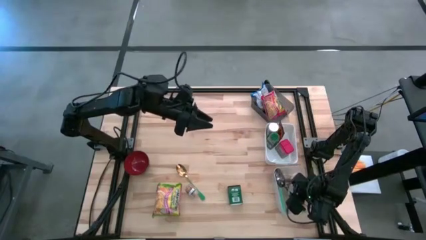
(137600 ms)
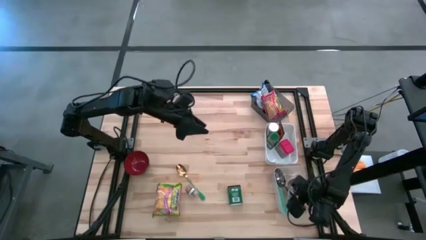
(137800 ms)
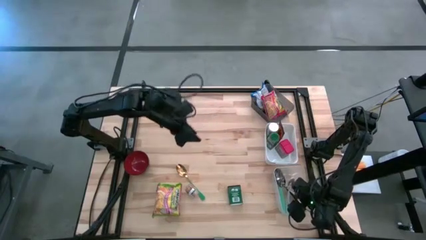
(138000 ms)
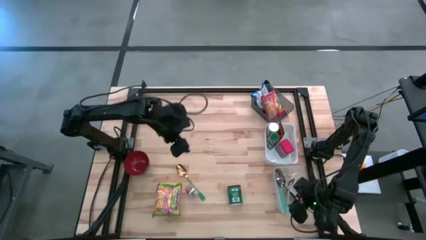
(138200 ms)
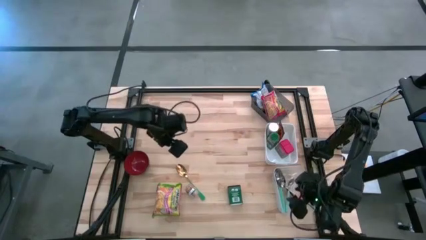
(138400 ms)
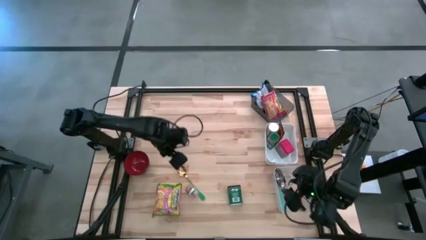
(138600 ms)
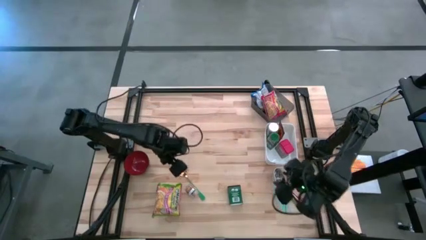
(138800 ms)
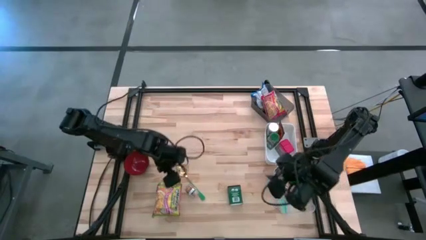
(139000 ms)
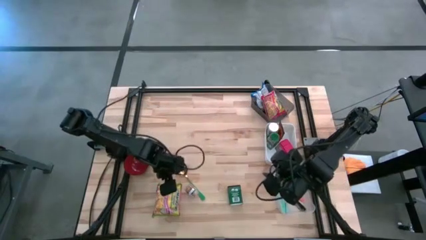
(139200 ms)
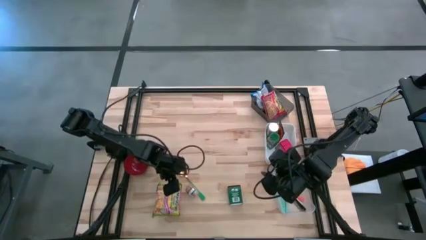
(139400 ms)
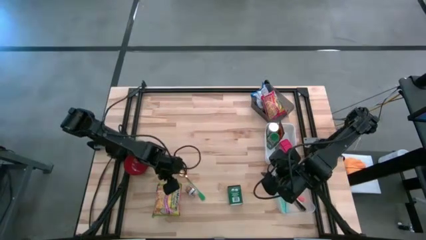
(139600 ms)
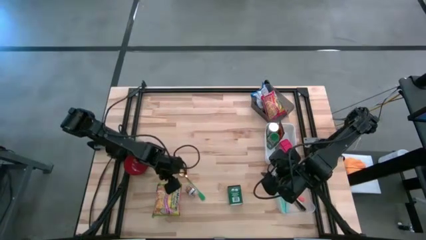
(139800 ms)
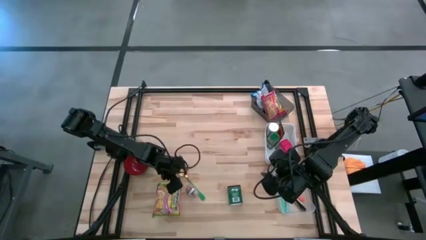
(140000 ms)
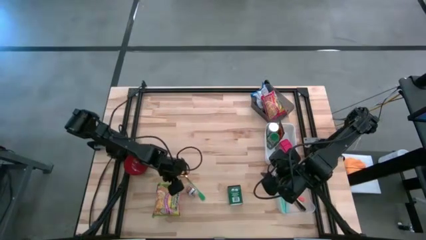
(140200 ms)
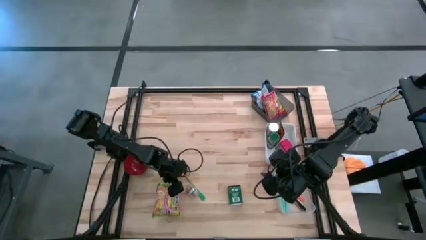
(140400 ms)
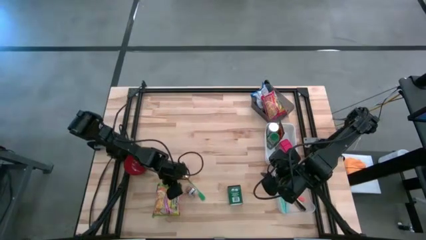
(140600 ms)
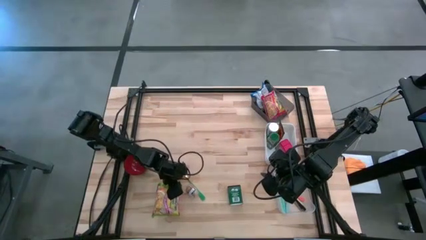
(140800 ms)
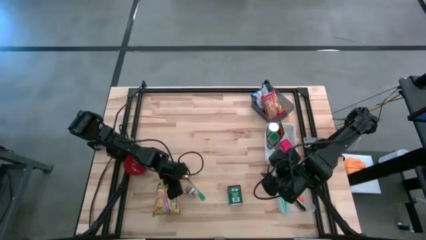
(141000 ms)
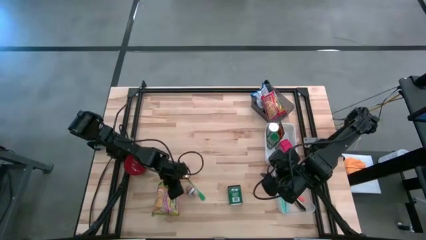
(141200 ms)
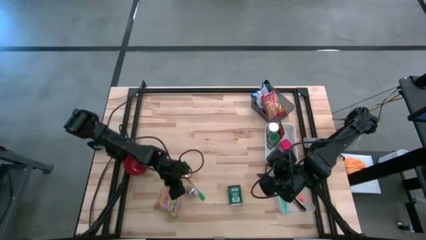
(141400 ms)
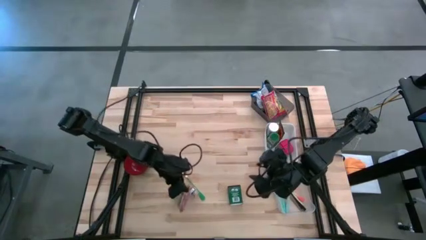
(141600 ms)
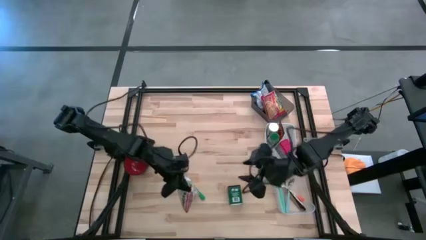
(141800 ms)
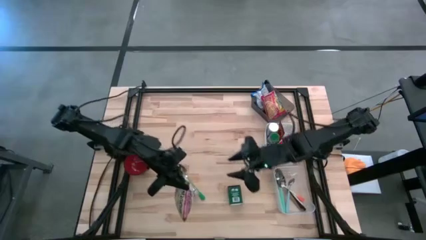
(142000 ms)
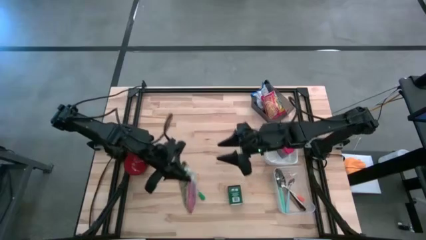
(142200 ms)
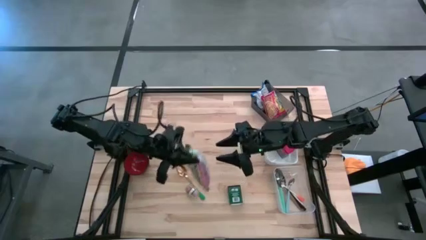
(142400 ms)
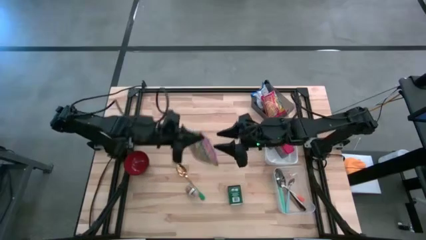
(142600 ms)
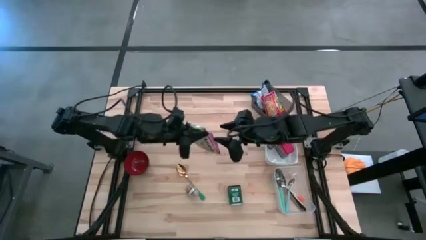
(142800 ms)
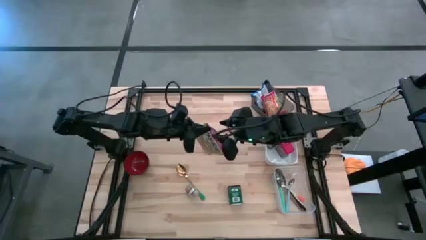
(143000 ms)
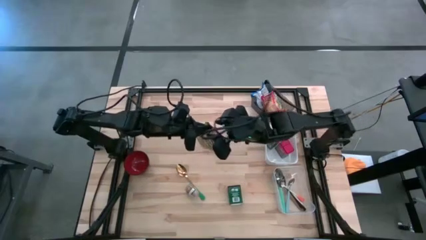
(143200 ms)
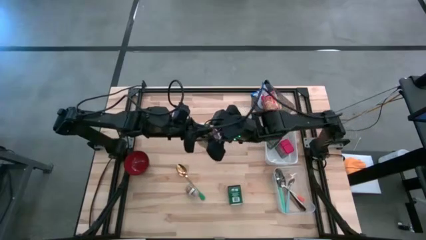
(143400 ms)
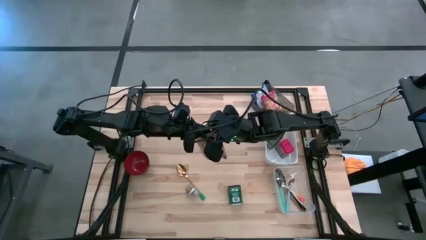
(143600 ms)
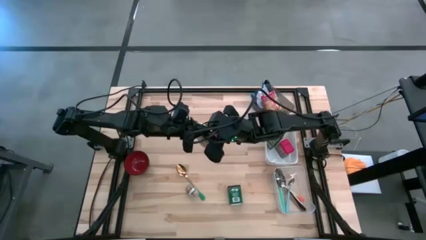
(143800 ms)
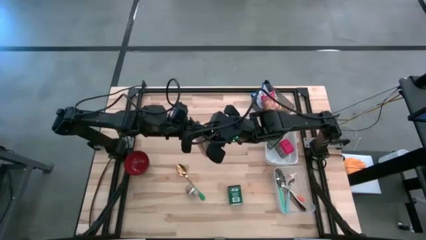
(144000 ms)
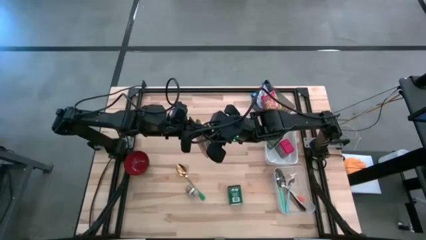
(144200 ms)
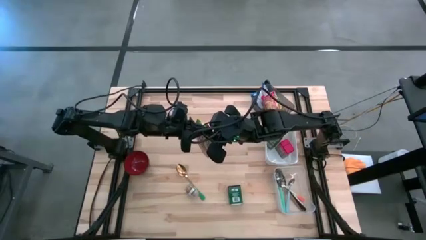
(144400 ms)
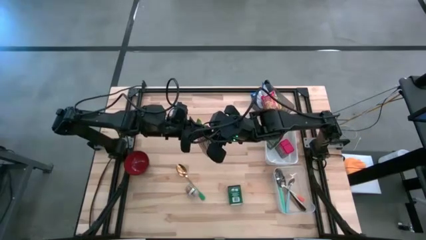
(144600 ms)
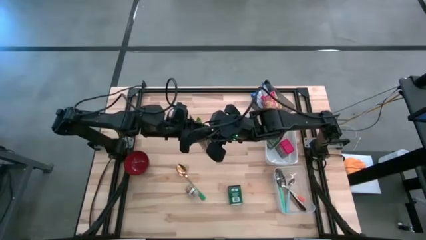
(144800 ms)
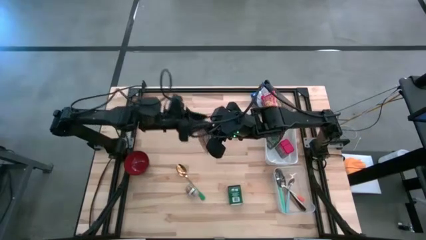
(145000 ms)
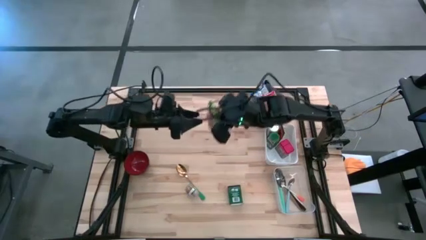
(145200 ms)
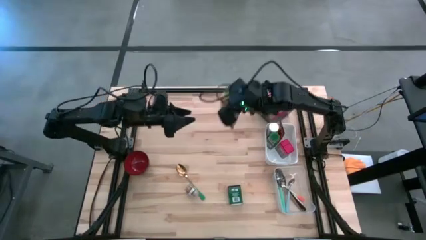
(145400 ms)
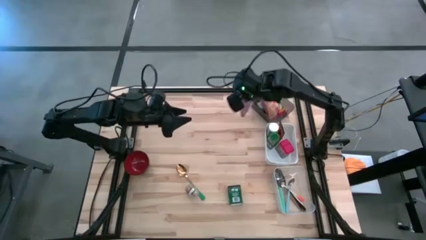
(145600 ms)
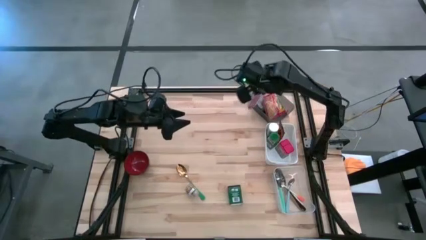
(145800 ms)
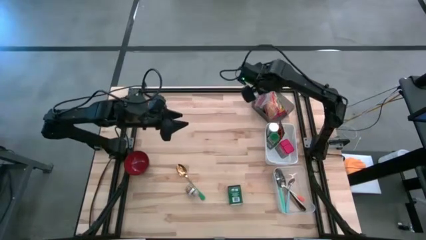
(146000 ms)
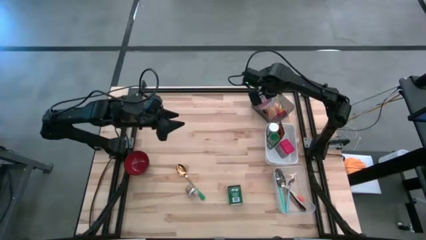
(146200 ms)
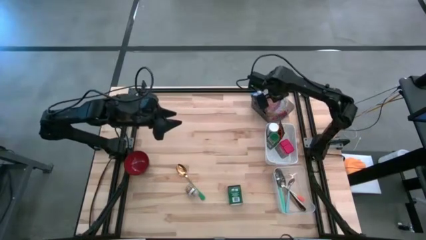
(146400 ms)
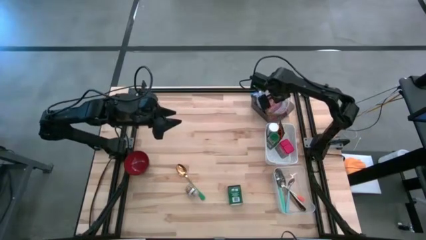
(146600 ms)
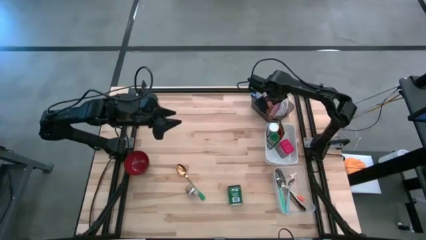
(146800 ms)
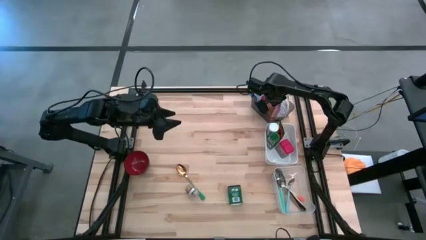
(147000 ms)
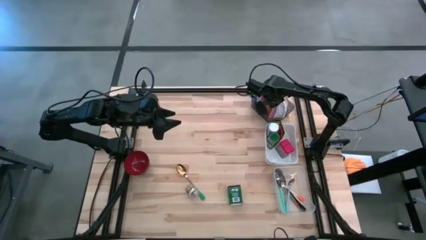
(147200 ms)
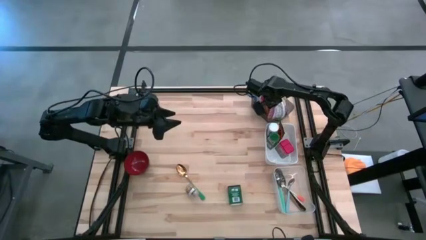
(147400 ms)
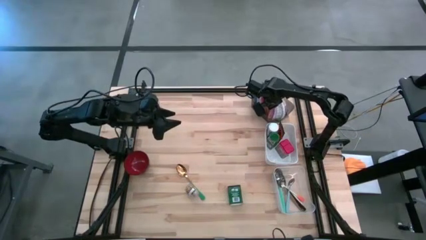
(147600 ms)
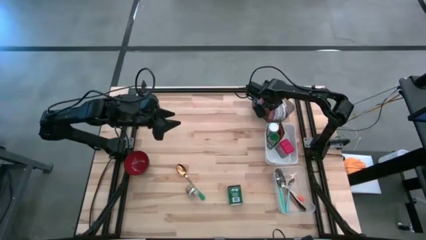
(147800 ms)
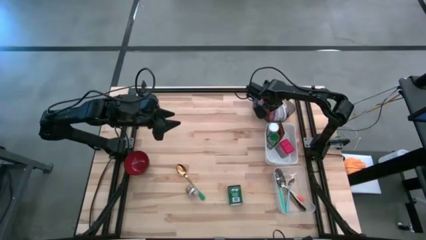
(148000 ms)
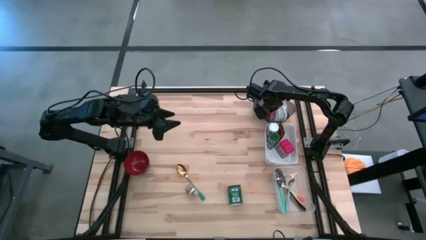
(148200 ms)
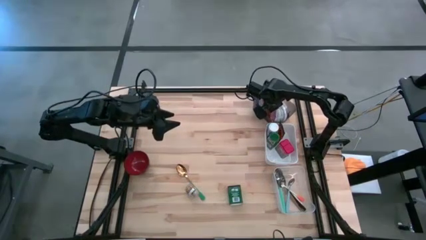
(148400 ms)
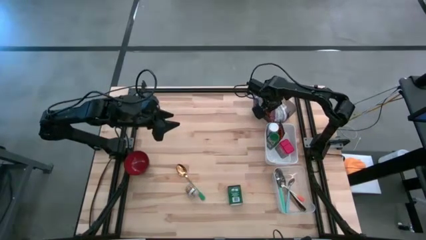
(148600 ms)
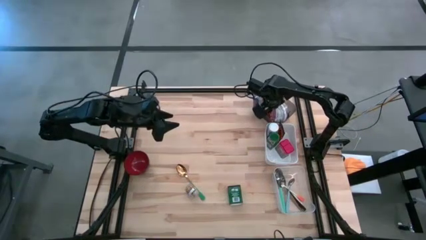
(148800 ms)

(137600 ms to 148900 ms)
Put the green noodle pack into the black bin

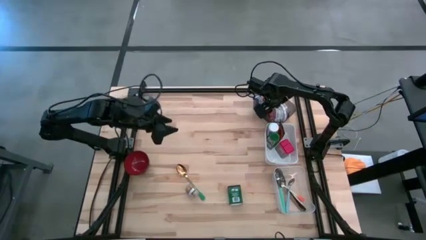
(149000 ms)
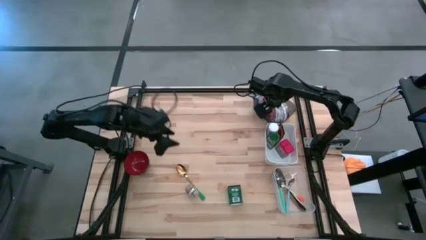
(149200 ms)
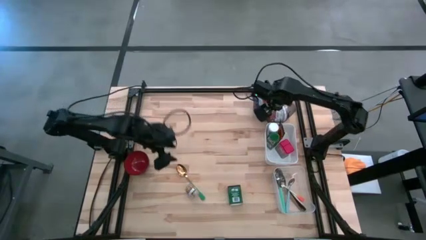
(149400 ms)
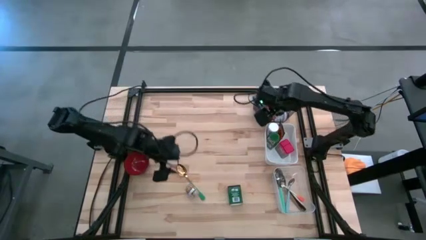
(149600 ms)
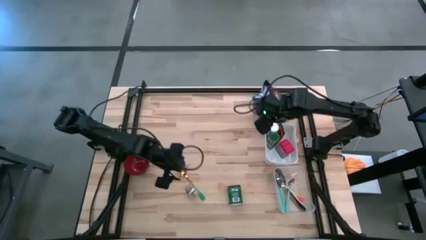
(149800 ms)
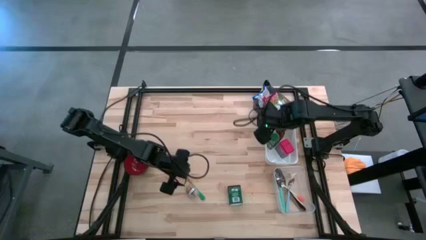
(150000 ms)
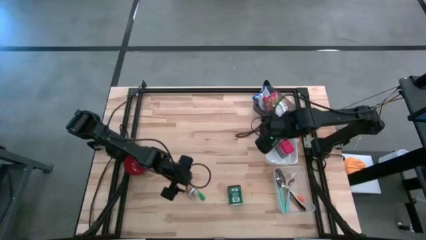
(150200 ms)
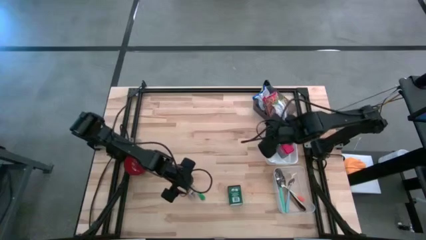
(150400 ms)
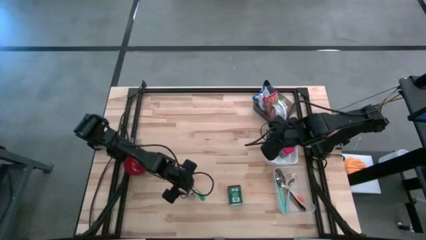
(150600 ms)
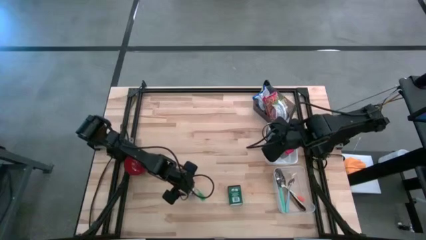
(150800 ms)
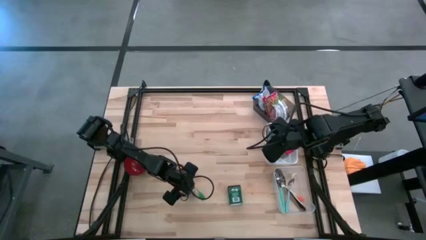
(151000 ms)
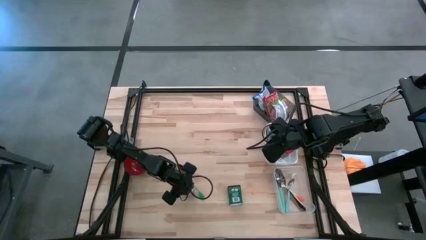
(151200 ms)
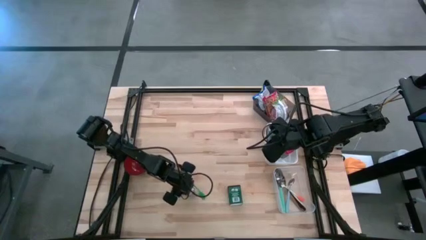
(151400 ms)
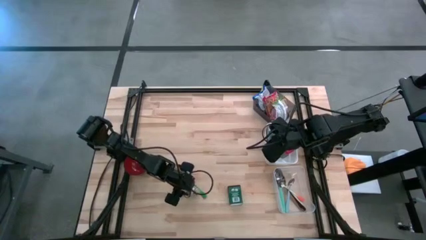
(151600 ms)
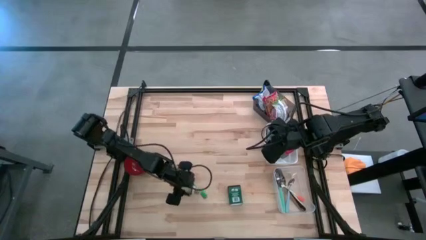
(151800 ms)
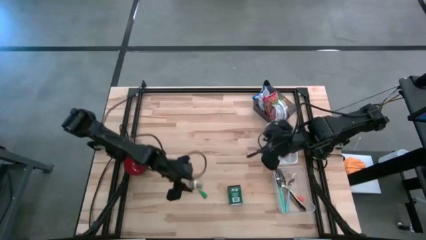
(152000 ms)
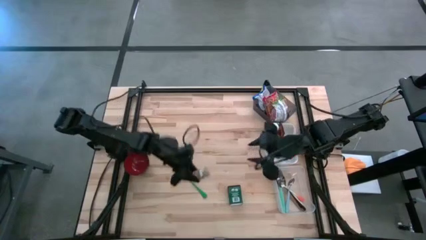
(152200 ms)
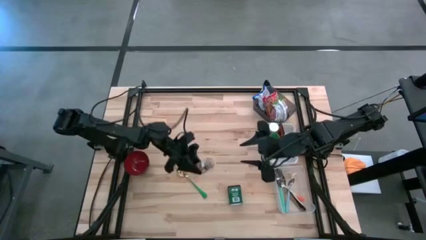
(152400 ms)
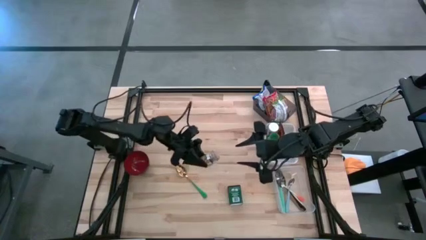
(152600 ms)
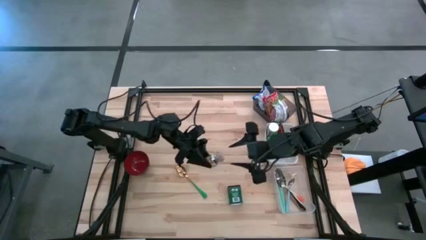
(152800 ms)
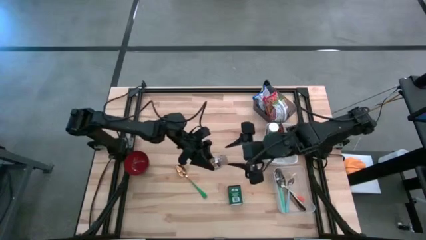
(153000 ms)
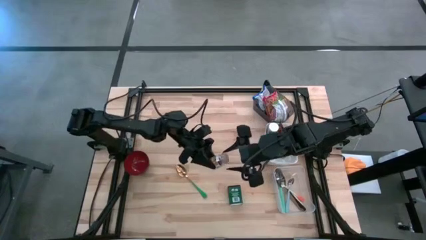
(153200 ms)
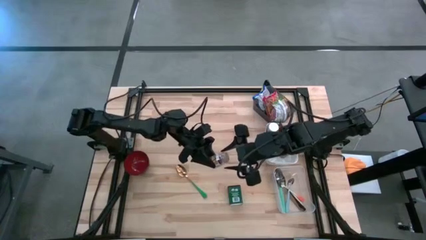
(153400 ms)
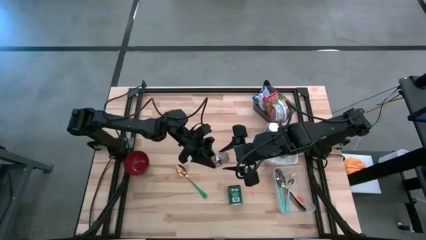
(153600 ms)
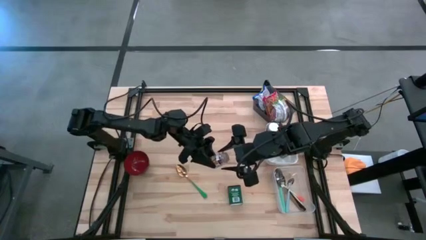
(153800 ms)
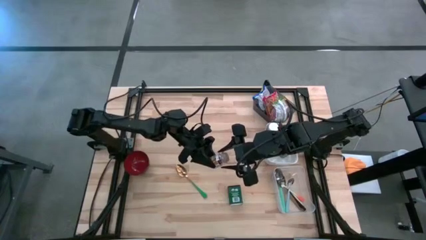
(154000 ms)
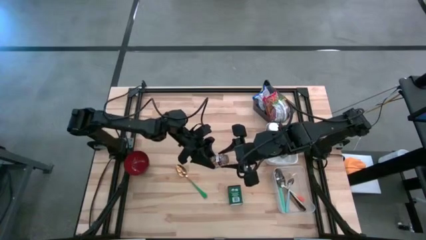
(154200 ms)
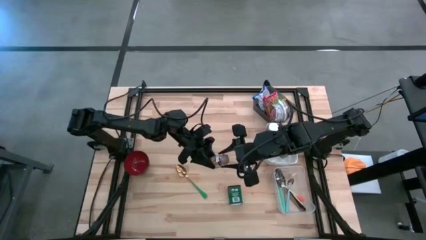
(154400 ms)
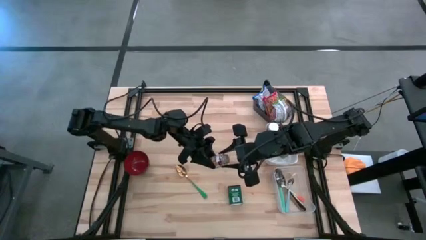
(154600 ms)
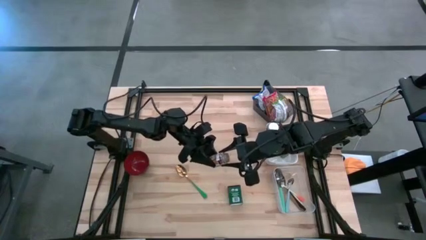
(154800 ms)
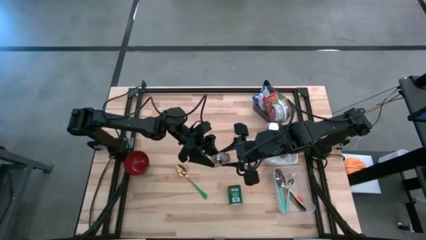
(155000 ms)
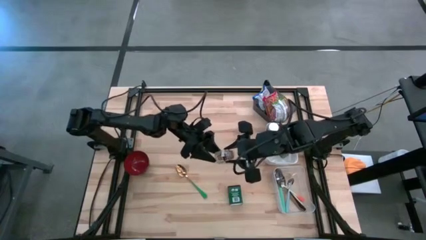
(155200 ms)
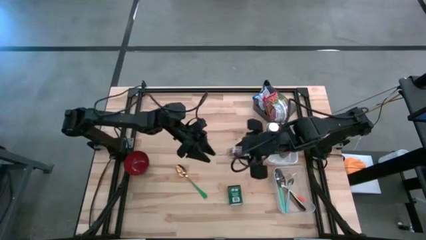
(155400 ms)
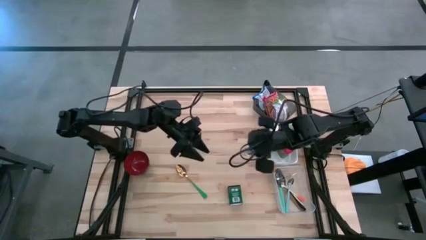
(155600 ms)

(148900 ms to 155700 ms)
Put the brown seasoning bottle into the white bin
